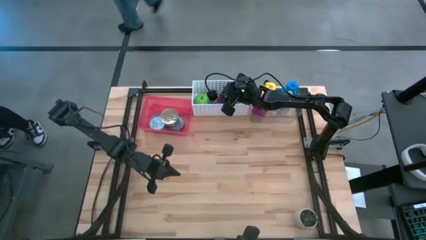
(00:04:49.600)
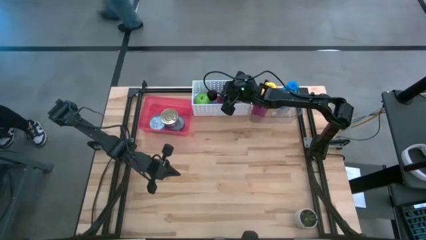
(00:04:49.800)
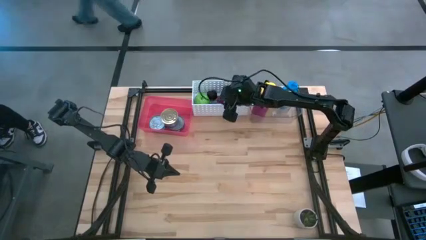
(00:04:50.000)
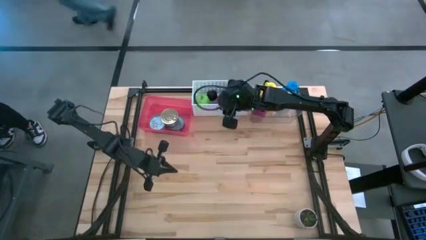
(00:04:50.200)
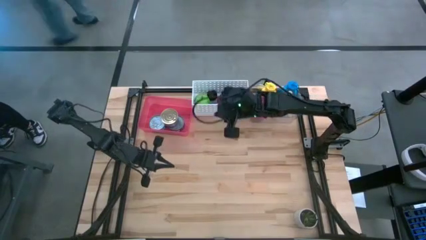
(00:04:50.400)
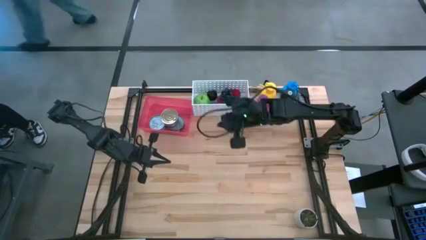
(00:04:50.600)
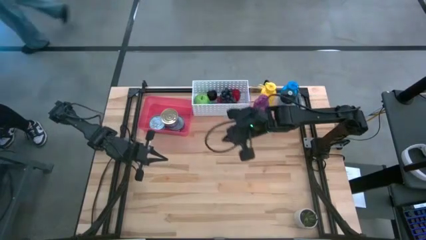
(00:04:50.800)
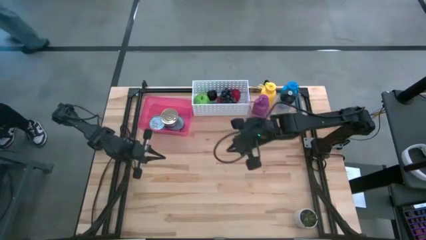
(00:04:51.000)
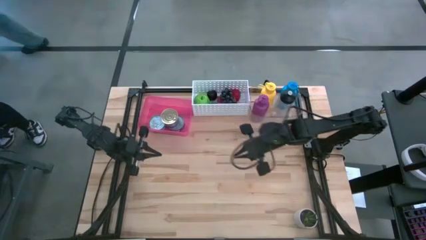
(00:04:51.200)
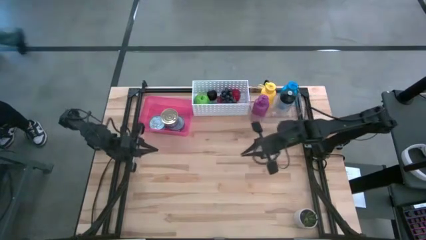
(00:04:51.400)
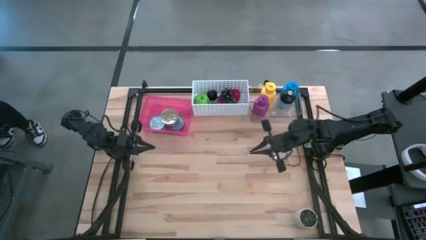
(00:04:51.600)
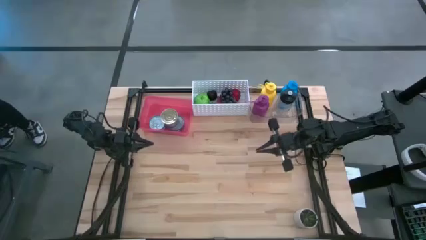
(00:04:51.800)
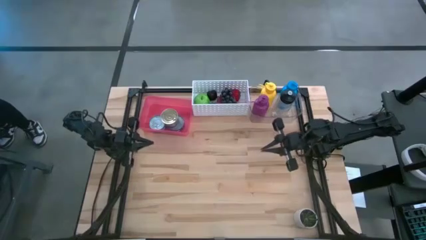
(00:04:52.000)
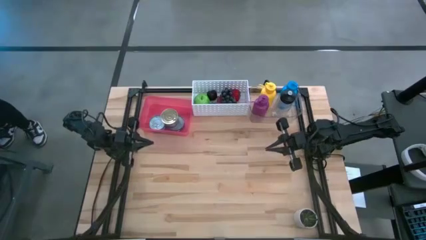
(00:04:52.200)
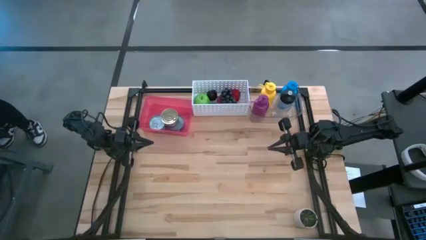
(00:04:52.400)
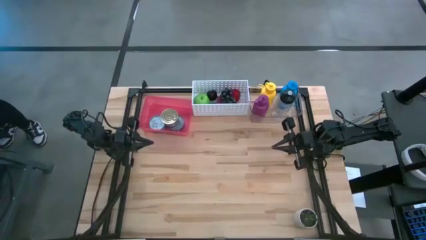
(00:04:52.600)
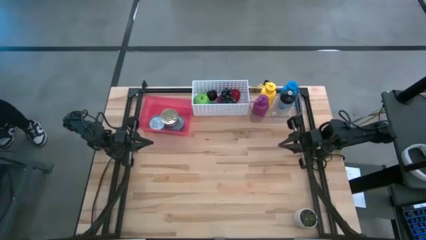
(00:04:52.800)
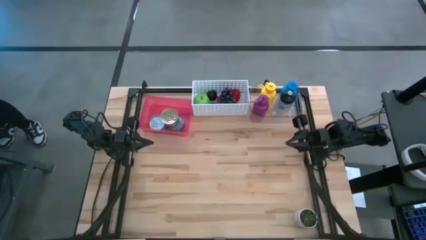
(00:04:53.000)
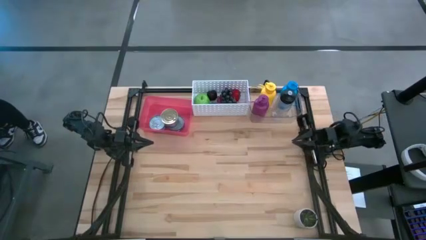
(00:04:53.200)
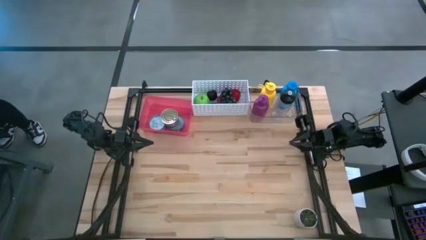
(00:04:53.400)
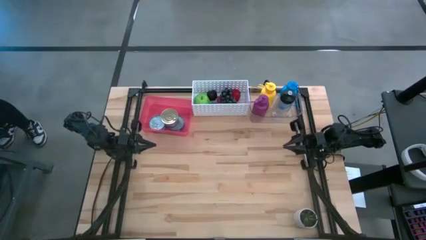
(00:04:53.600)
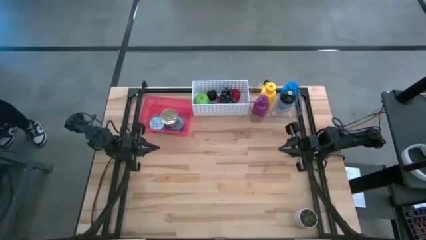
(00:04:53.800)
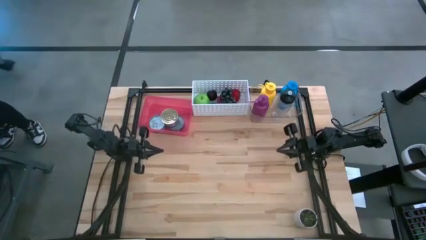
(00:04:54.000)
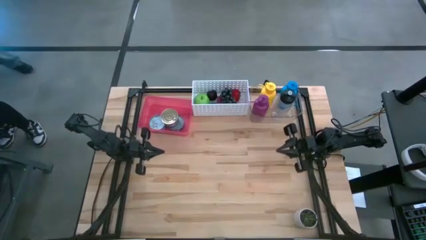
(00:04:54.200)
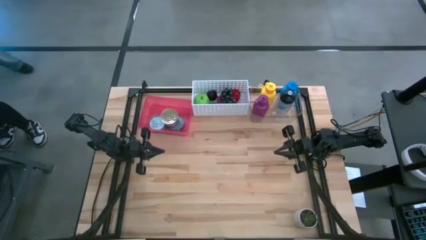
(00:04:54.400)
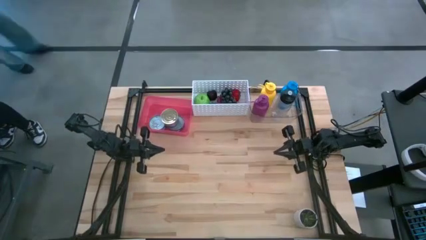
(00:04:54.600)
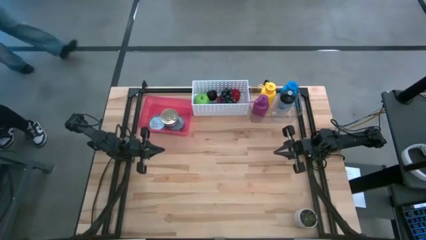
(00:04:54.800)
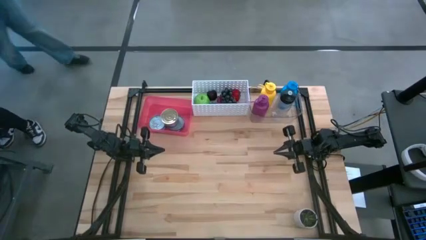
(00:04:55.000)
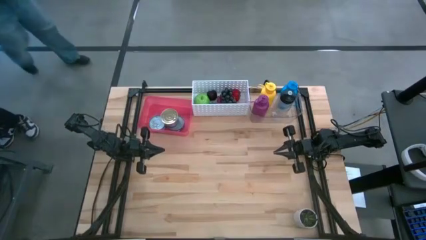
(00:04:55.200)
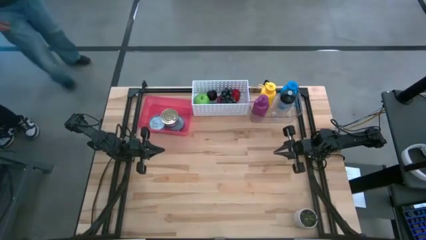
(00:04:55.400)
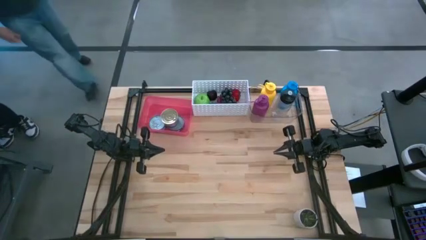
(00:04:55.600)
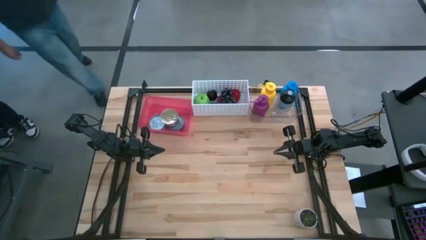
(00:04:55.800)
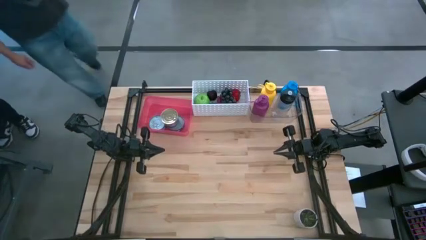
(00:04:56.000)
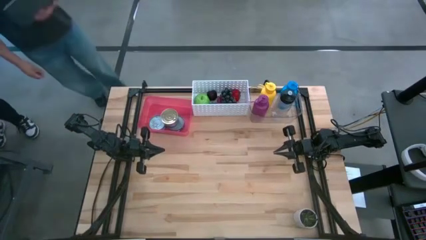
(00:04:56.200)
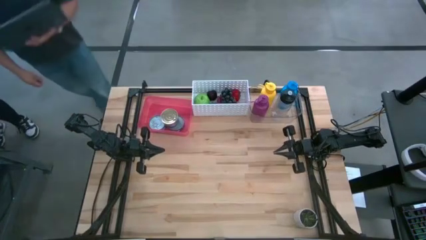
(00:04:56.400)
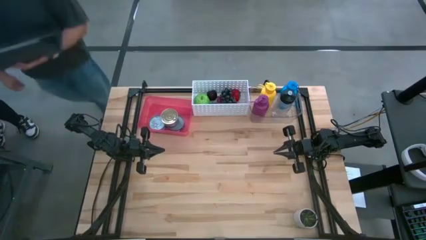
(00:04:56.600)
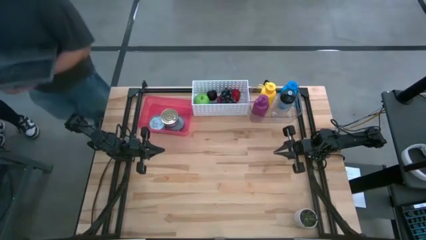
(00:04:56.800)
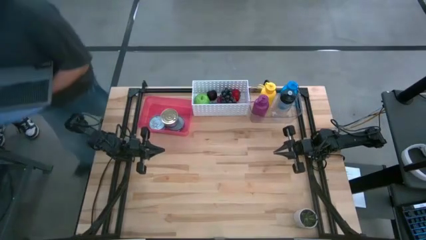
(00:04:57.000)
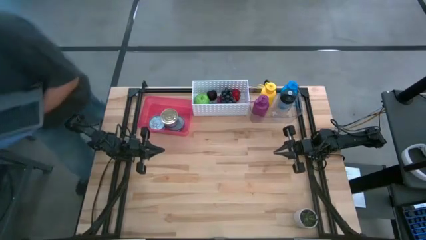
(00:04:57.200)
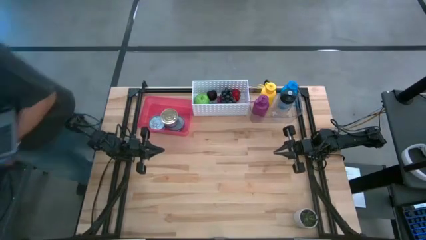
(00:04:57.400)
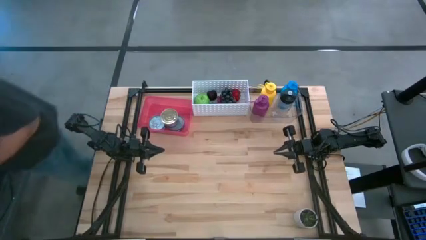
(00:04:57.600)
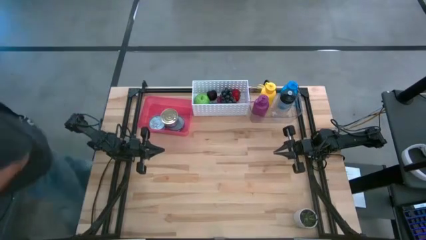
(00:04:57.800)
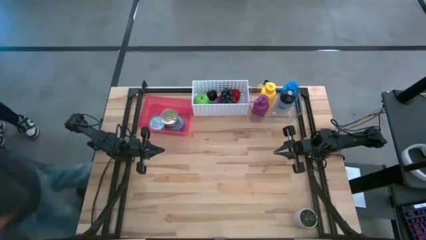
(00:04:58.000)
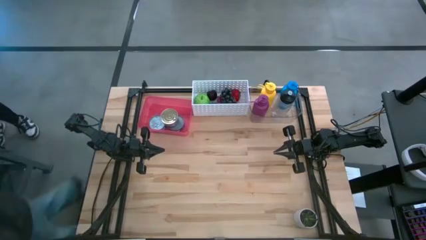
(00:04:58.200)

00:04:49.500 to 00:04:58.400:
Task: Pick & Place Food Item
Return to Home Position

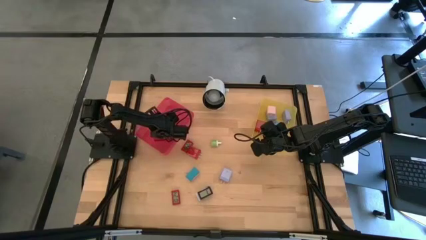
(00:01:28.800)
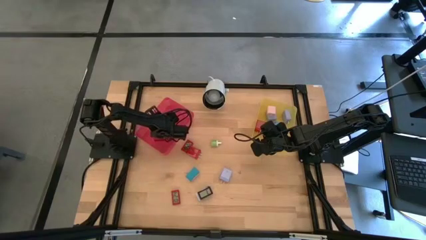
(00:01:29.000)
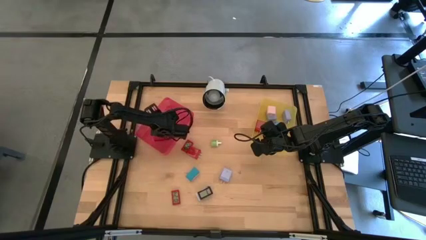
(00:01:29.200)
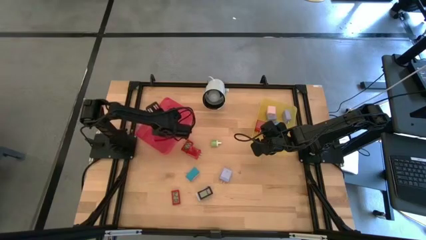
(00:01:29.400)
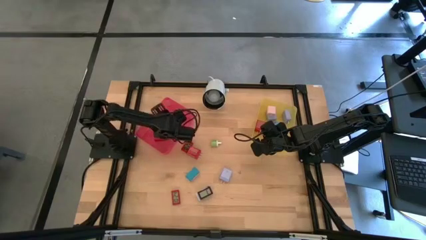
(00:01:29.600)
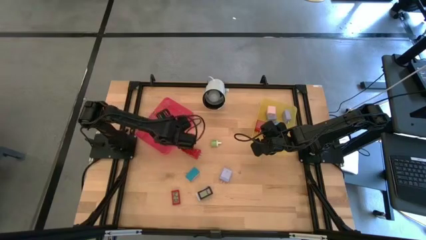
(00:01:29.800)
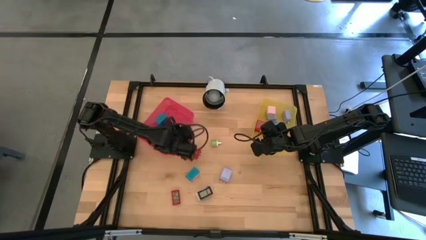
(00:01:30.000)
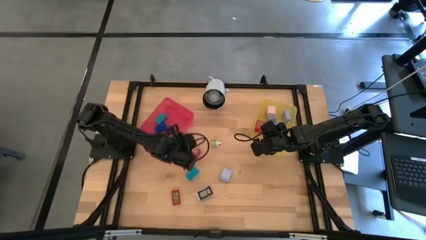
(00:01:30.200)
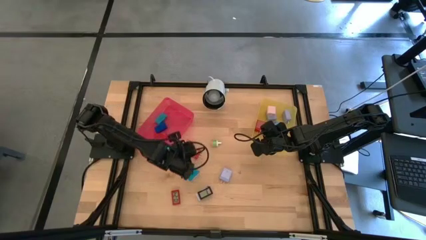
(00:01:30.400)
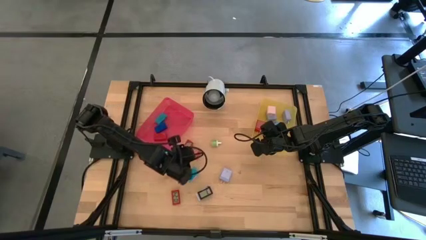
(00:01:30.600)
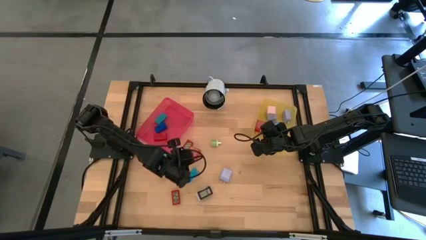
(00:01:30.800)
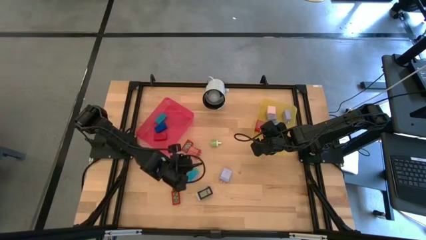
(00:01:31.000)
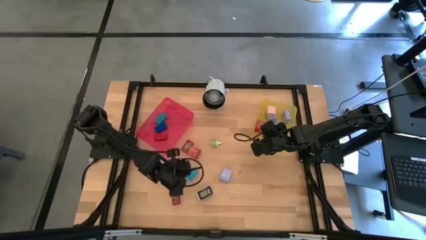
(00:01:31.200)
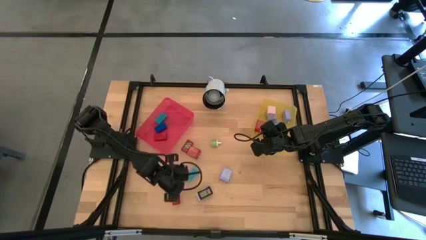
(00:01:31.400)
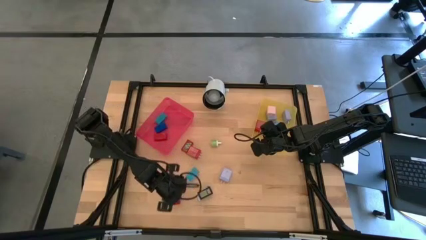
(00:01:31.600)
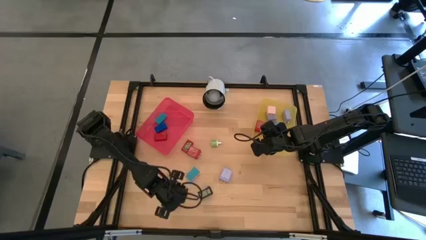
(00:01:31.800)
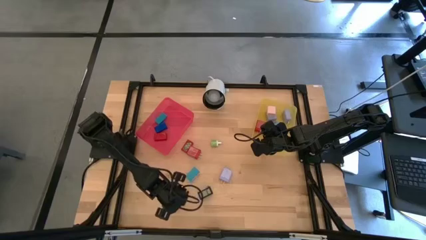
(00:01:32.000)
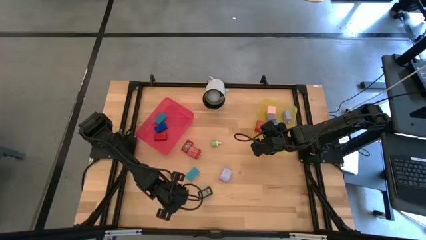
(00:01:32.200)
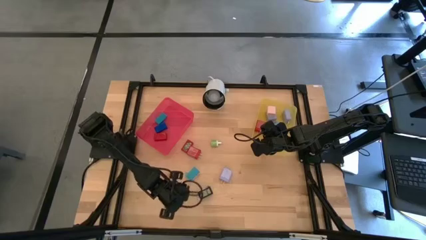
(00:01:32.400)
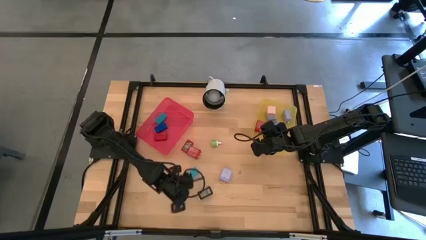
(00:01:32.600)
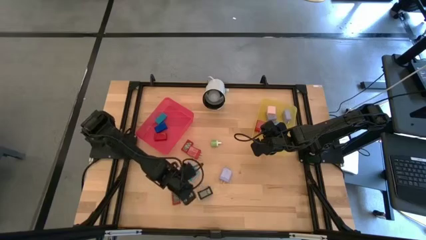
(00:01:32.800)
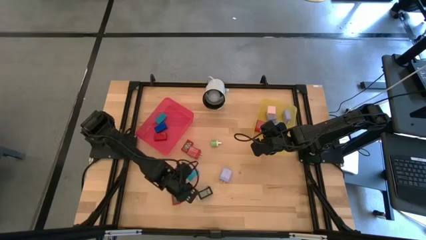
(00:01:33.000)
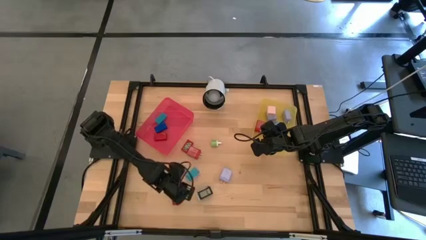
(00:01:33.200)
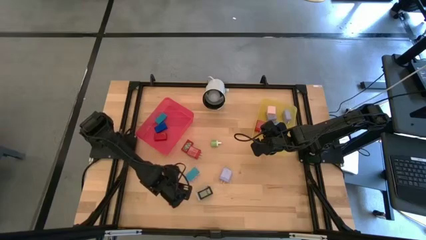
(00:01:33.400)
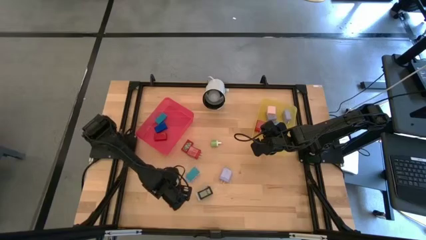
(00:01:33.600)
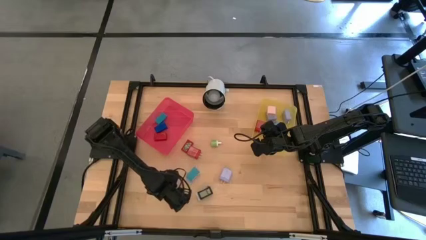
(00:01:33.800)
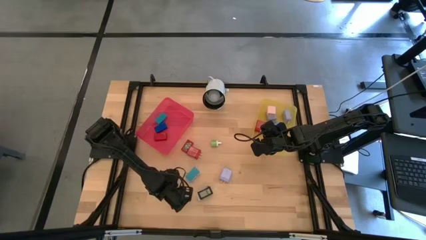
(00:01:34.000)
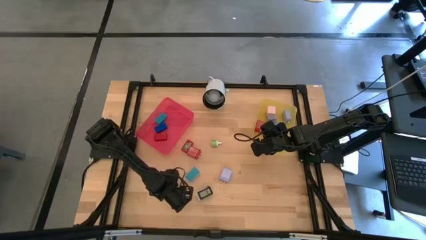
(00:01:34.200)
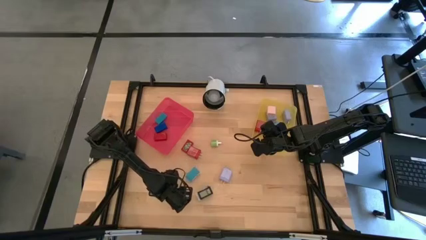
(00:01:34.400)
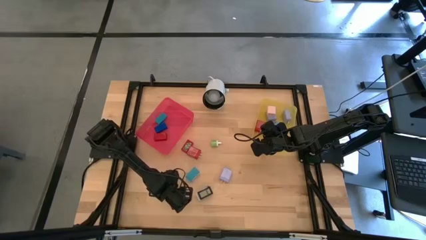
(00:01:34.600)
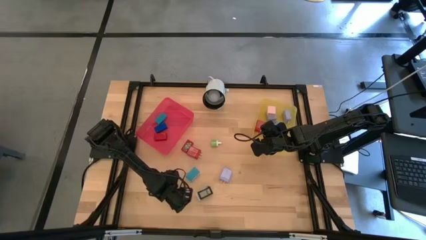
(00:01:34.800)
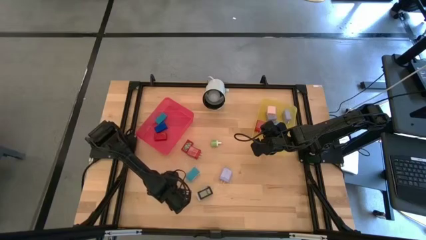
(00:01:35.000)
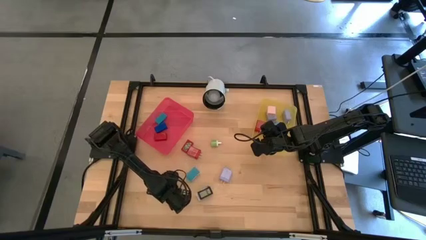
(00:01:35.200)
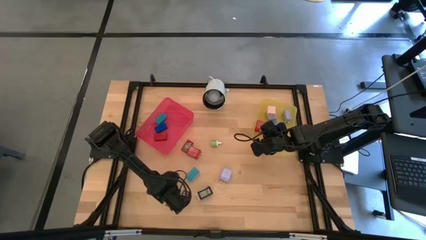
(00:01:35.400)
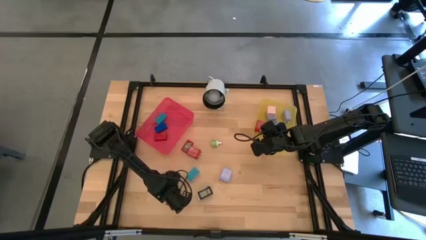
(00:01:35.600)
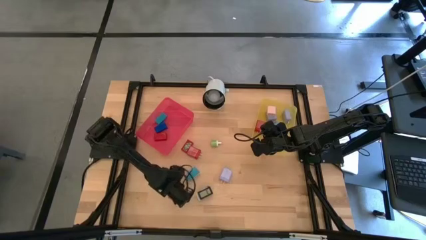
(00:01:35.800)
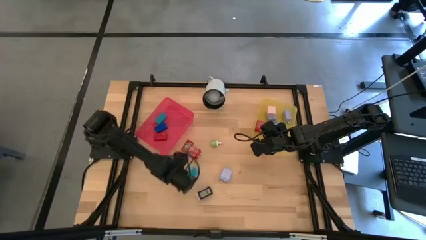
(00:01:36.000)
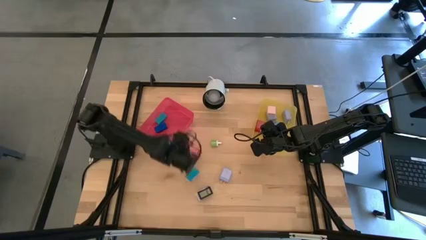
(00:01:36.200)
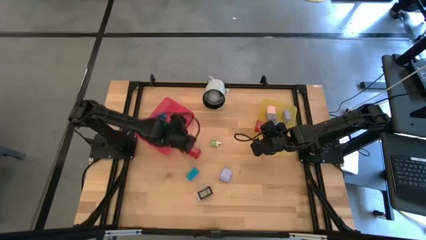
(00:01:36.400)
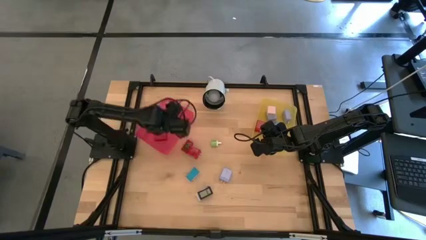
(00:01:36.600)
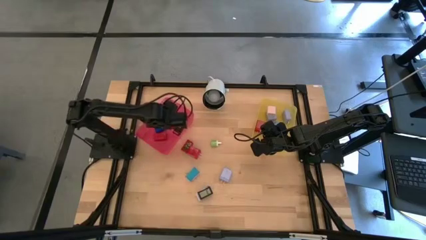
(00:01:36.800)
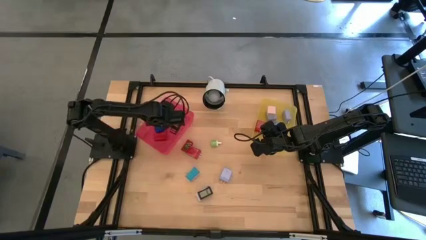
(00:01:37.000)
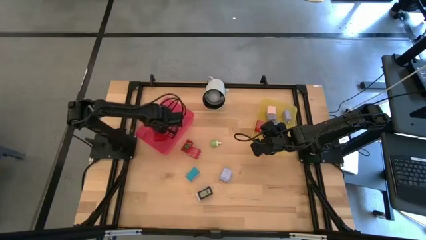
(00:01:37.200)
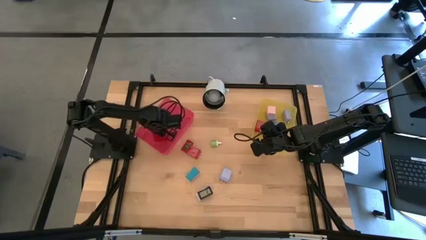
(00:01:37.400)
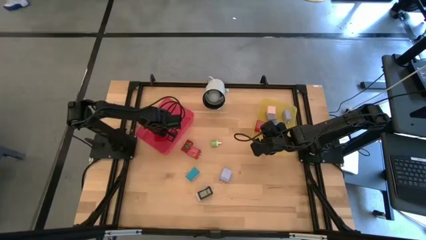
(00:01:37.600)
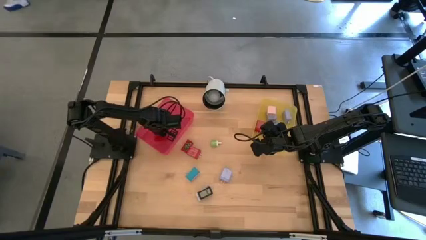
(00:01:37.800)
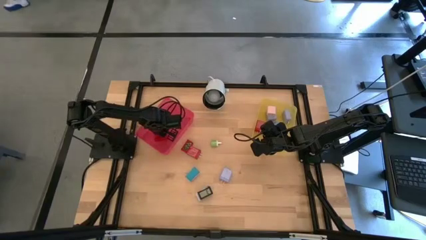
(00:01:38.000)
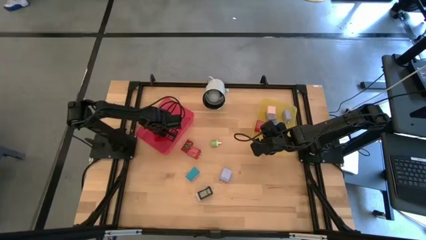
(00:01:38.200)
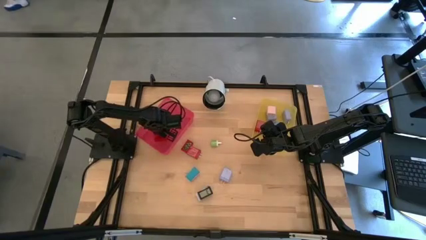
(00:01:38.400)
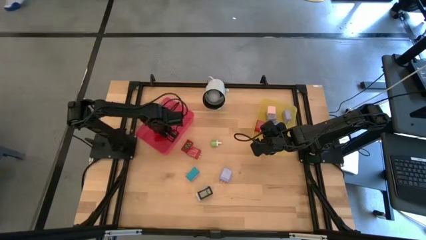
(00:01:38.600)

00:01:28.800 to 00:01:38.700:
Task: Pick & Place Office items
Put the bottom red digital timer into the pink bin
